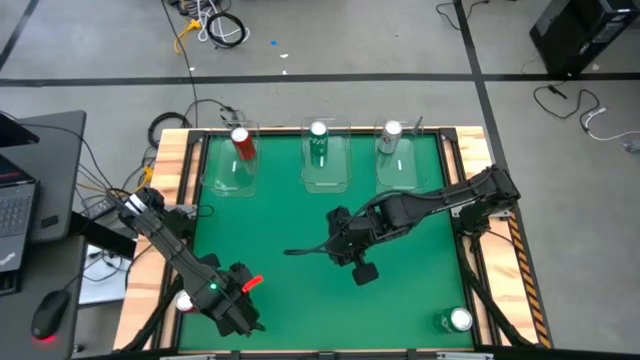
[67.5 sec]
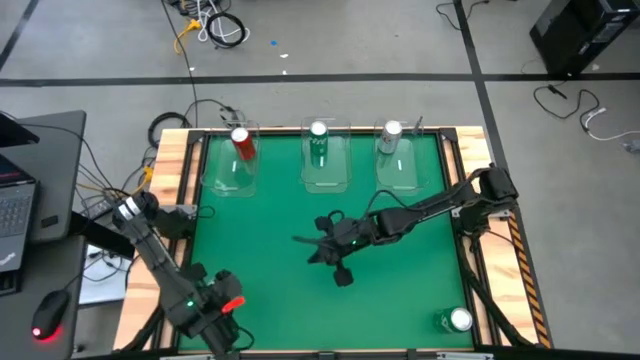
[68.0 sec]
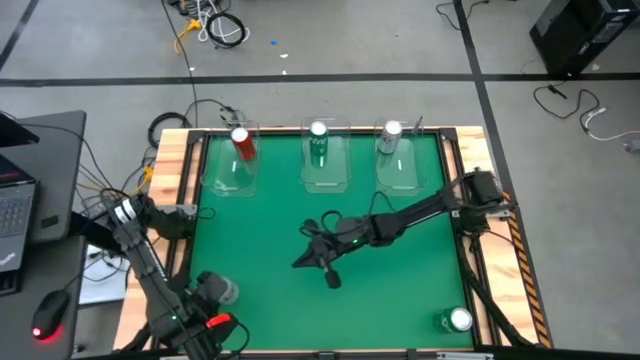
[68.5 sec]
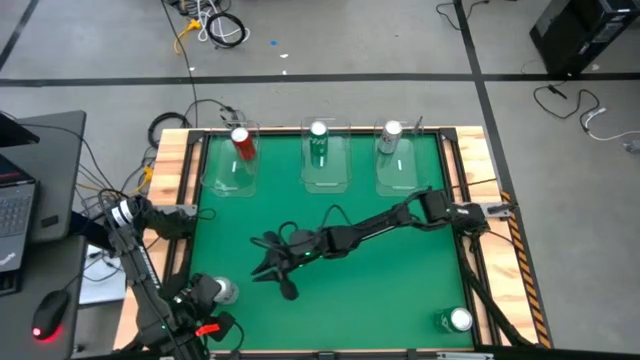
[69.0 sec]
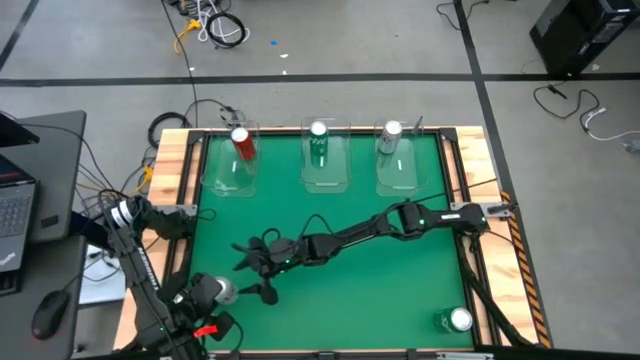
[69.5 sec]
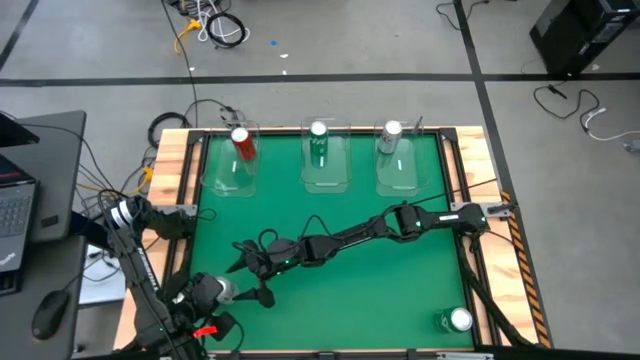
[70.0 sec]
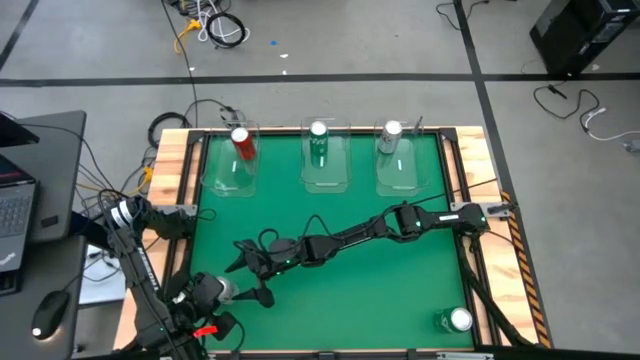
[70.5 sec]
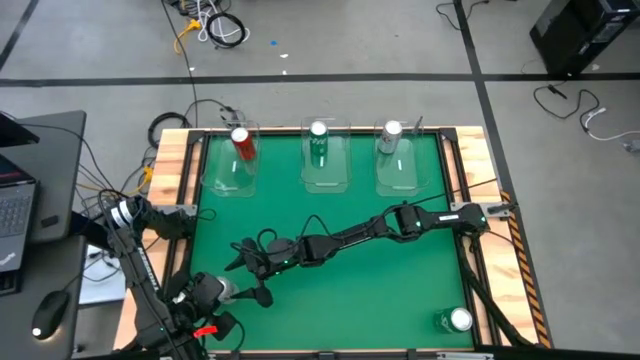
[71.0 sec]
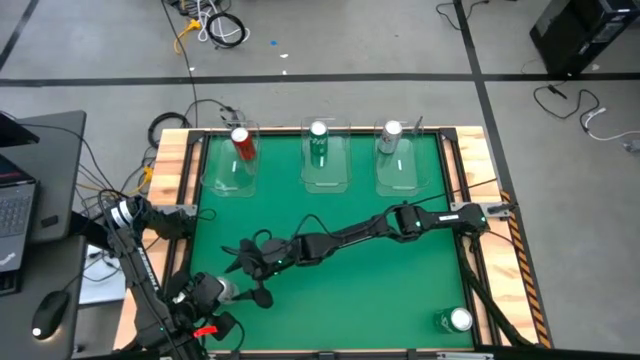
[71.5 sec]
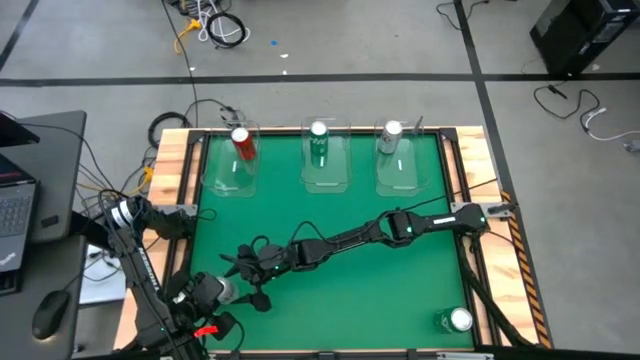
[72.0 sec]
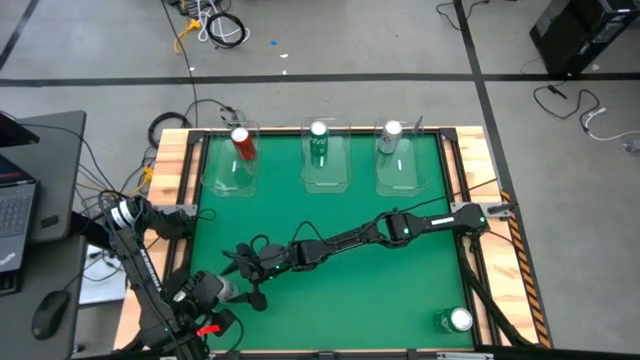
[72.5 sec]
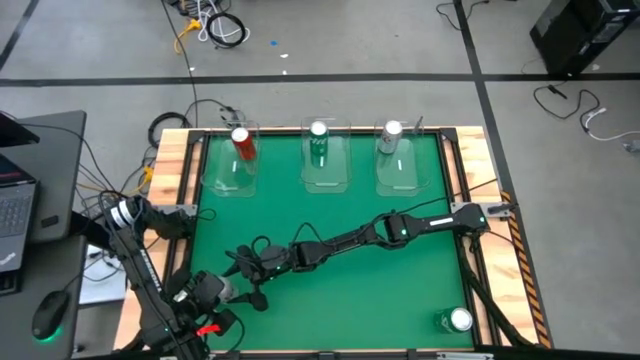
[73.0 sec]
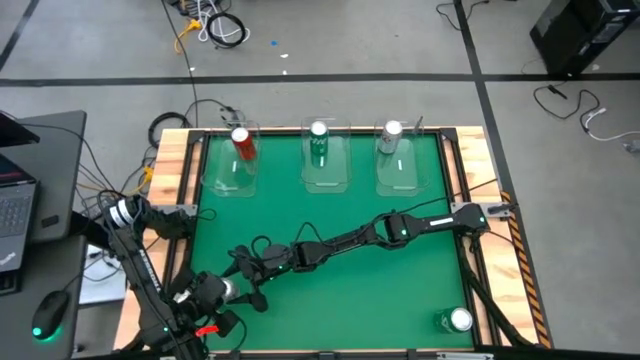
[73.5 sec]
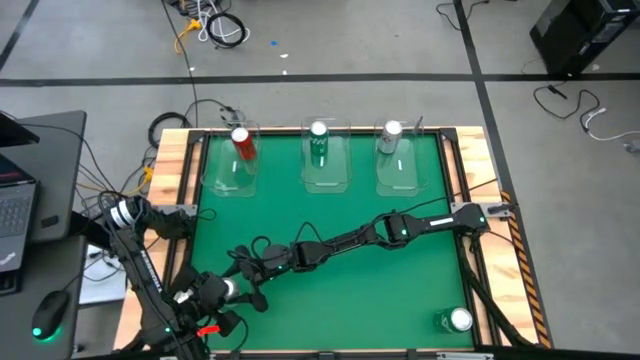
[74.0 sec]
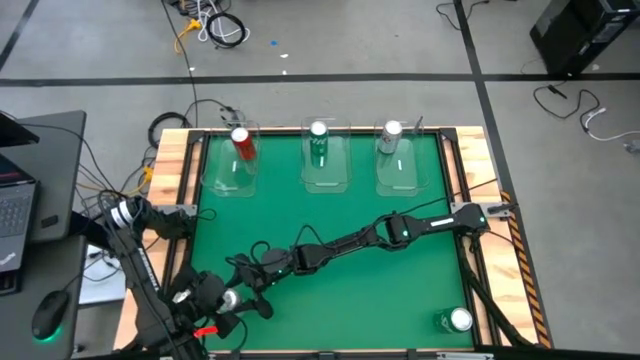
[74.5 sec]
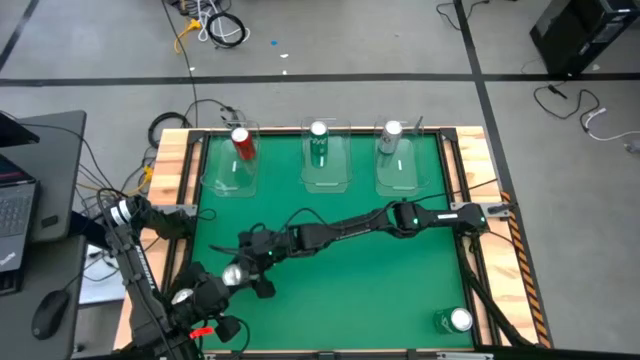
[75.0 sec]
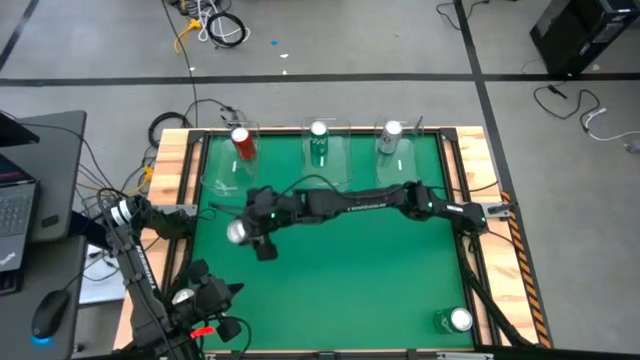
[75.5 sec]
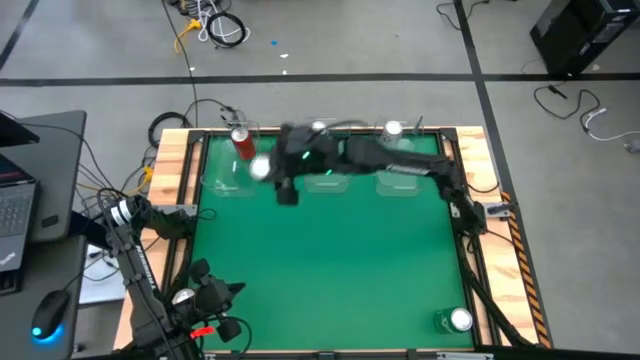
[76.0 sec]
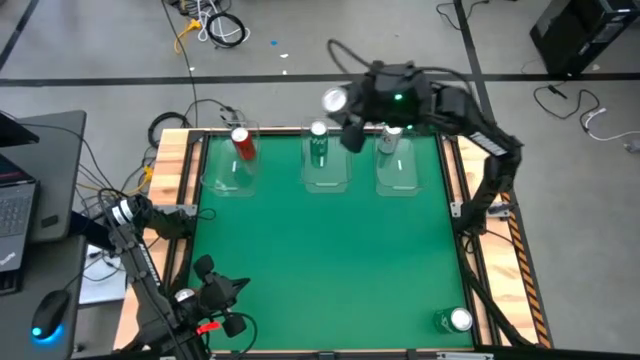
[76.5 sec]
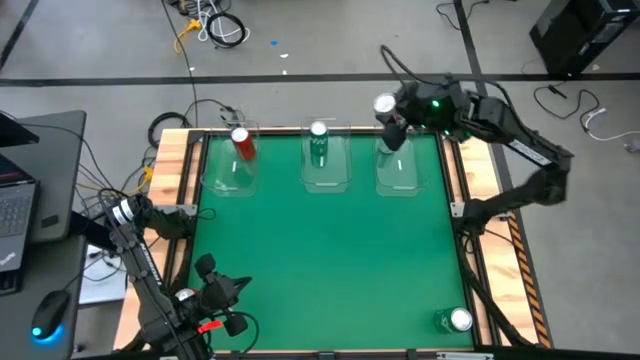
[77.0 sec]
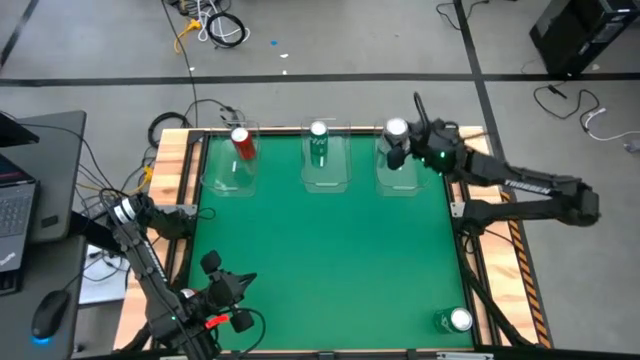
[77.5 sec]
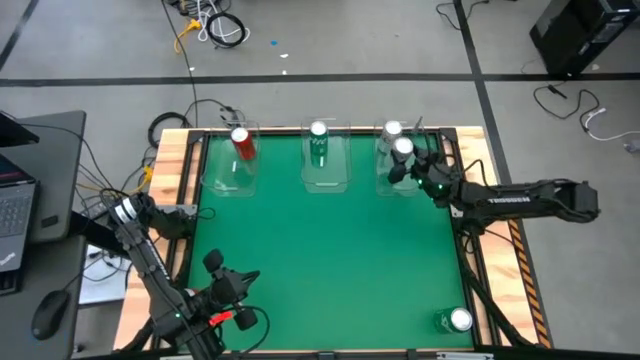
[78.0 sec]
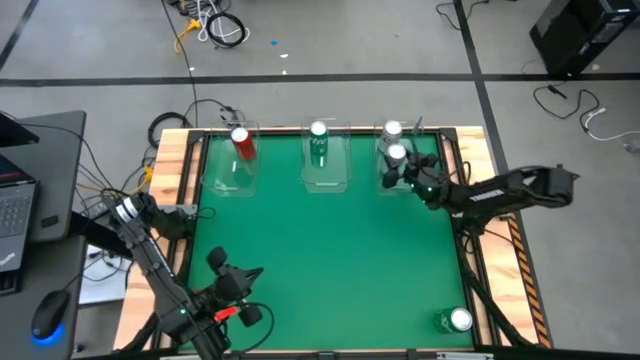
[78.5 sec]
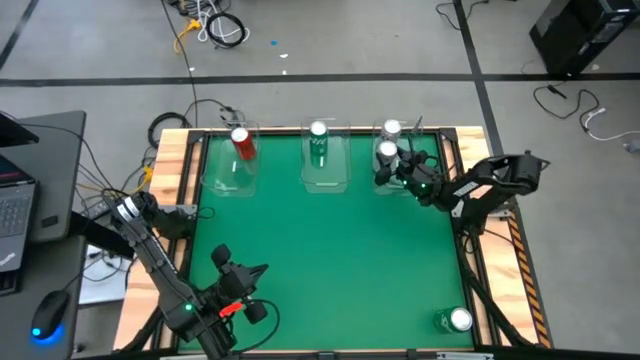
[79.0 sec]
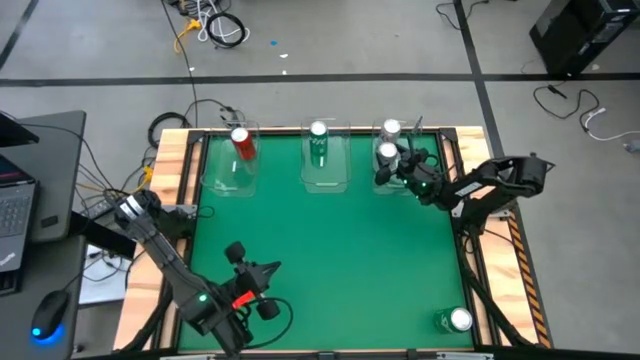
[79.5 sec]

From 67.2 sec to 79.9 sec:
Task: Sort soda cans
Put the white soda can into the right transparent bin

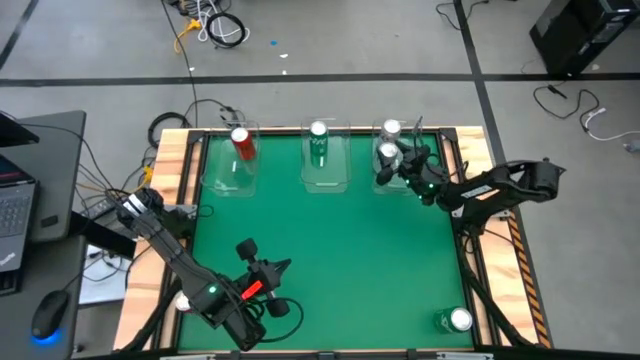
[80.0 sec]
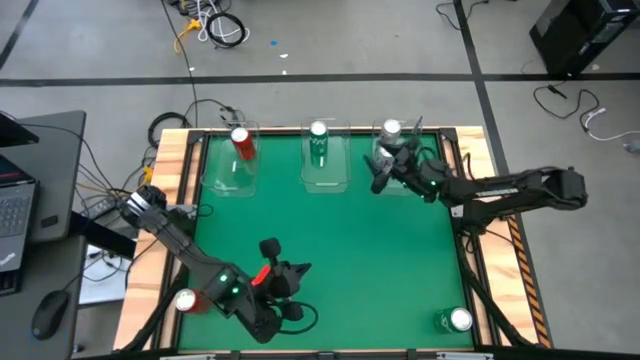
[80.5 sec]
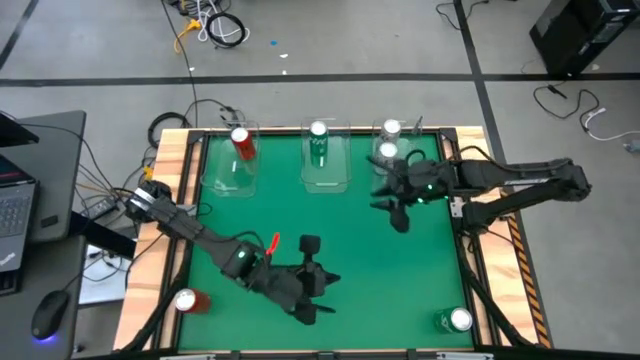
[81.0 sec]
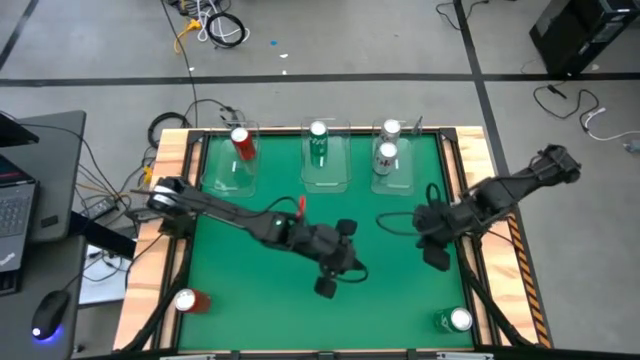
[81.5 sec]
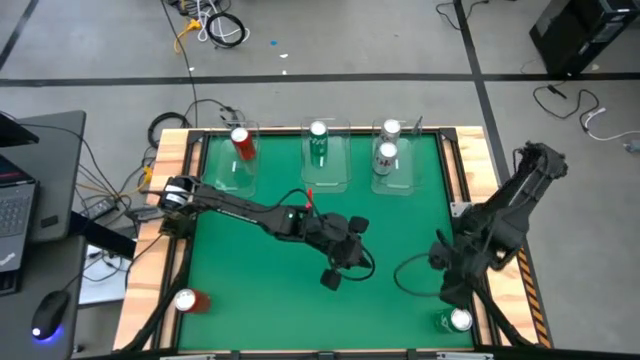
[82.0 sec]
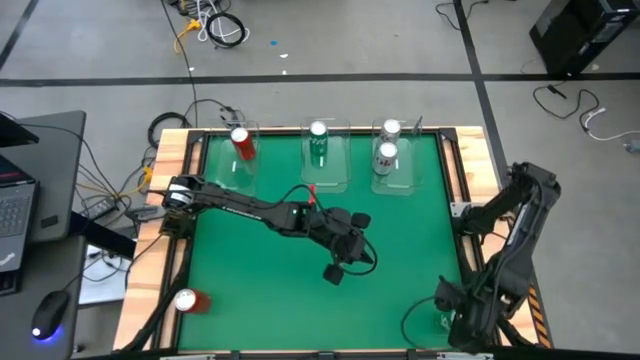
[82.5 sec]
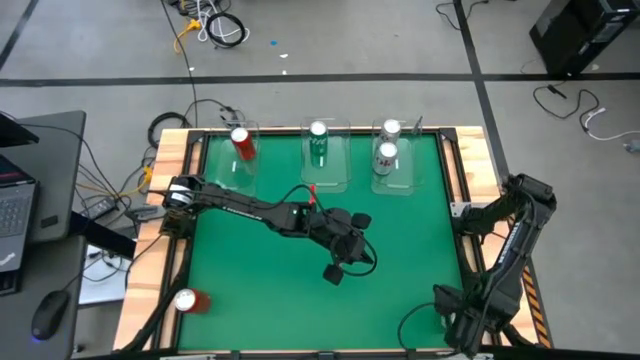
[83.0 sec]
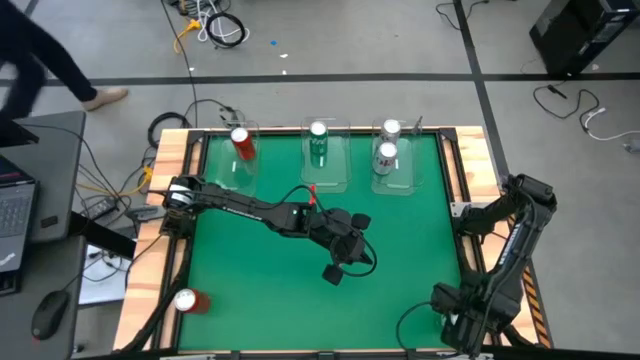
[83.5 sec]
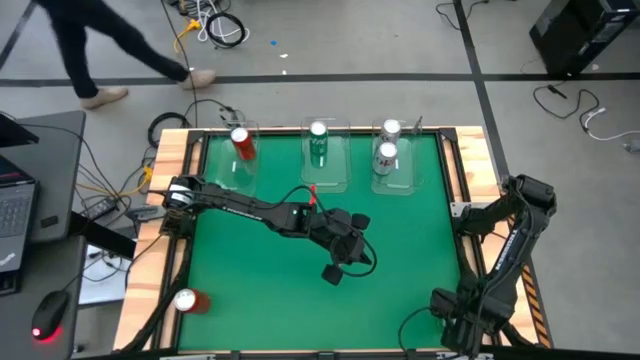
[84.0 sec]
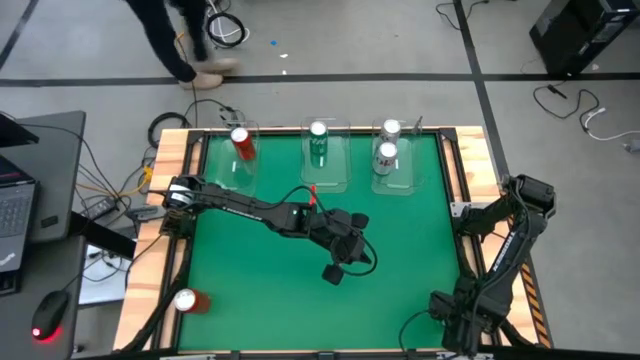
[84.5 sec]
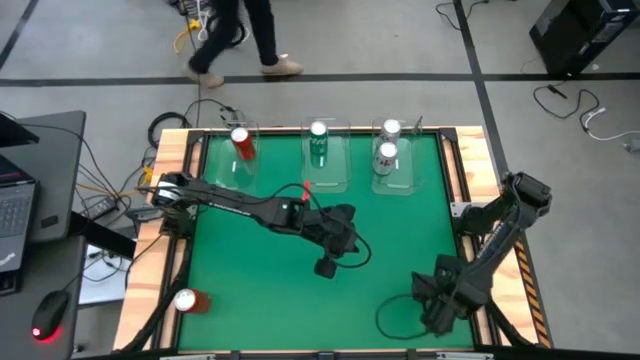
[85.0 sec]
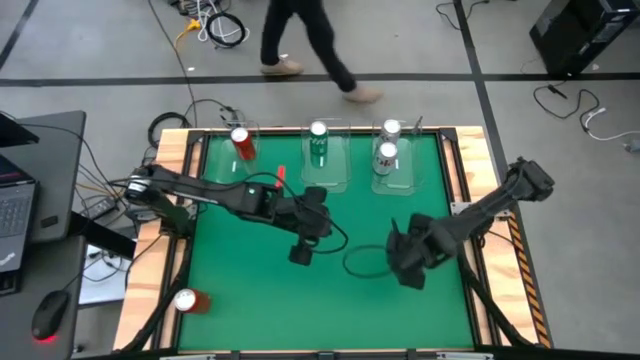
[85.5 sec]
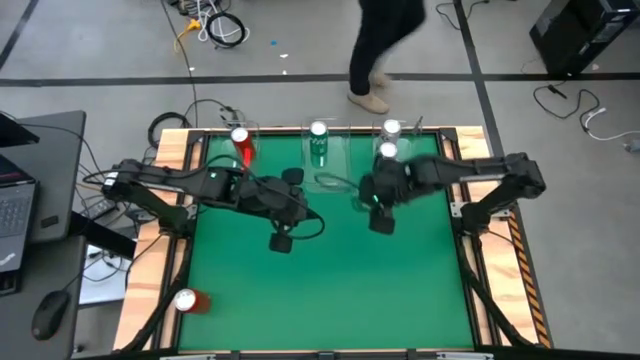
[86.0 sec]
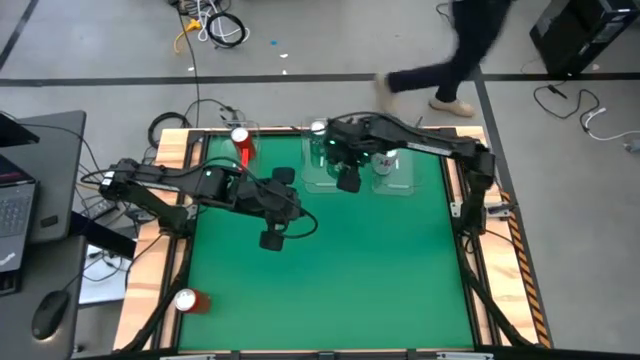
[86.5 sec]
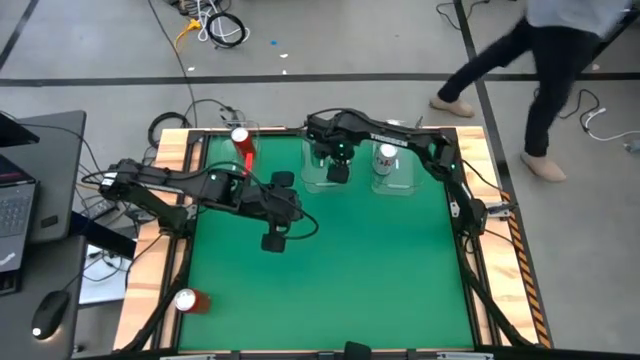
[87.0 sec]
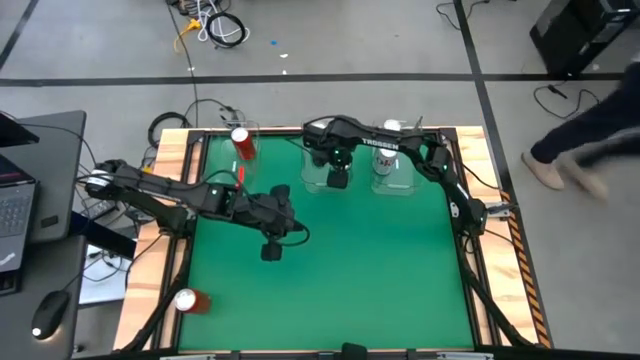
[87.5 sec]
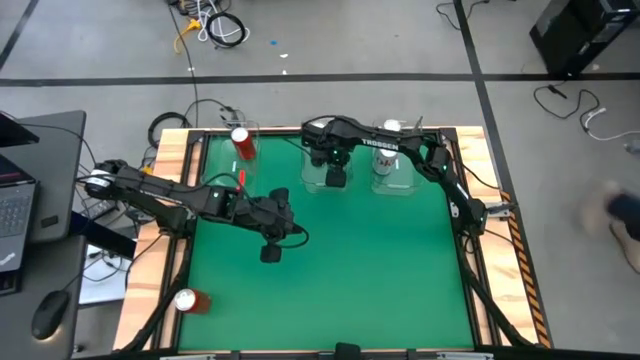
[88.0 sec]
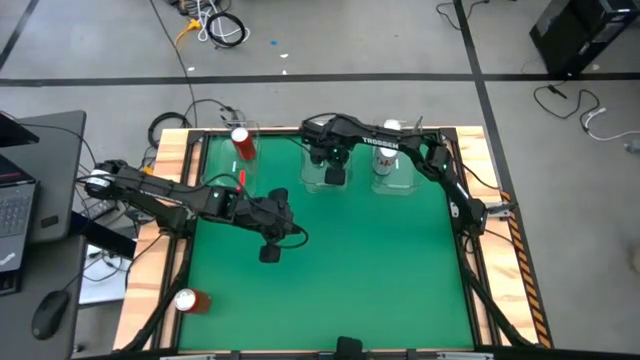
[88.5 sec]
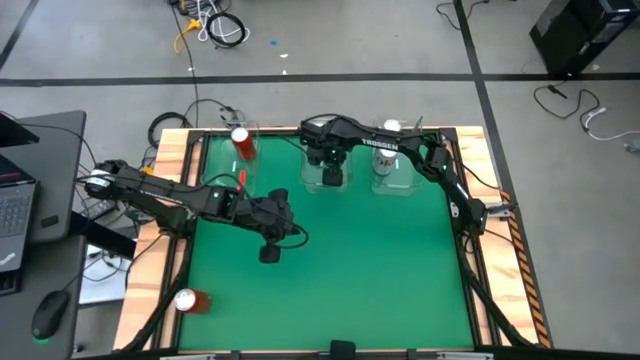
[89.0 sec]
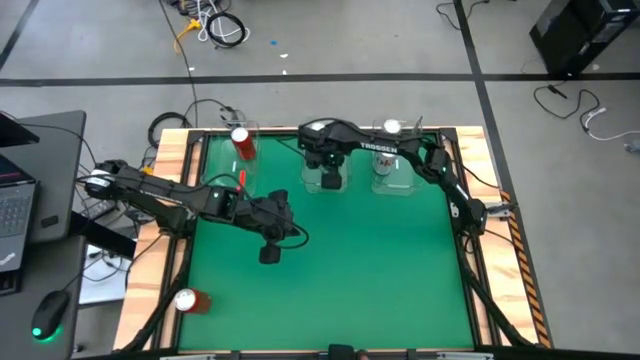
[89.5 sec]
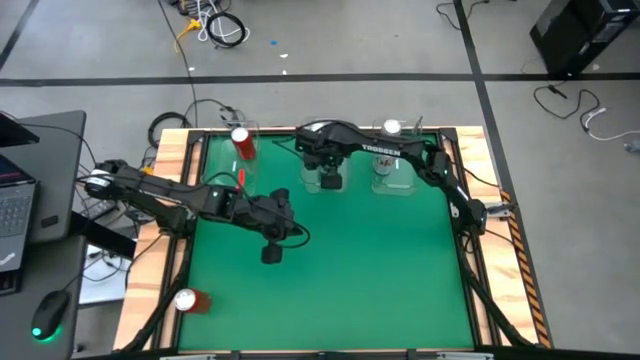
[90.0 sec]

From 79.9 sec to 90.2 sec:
Put the green soda can into the center transparent bin
